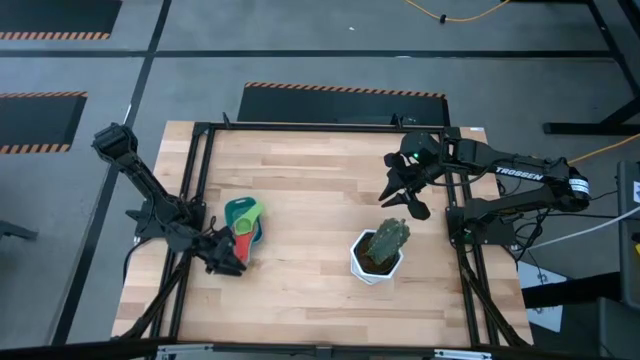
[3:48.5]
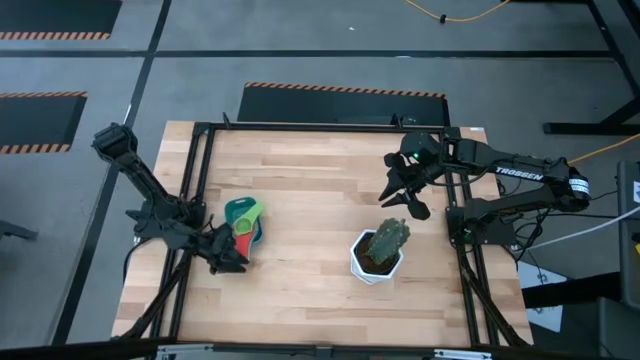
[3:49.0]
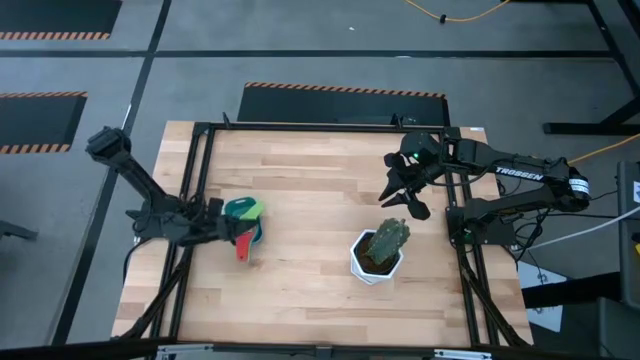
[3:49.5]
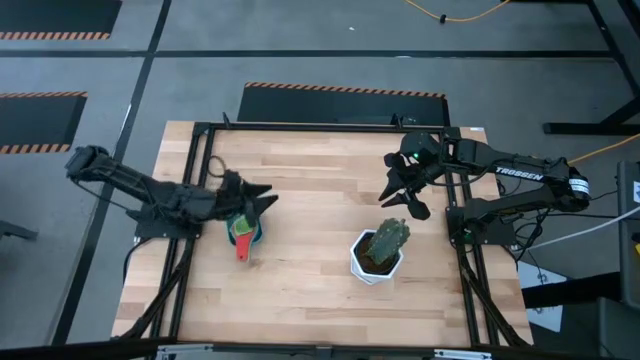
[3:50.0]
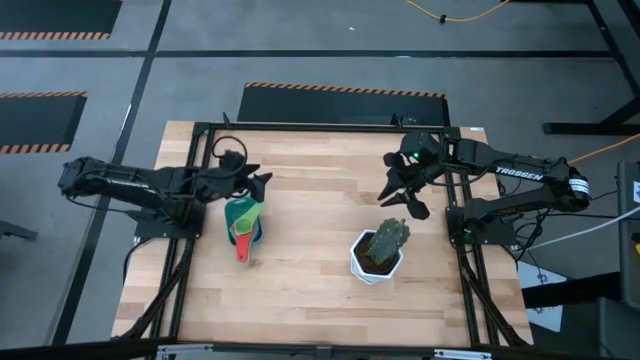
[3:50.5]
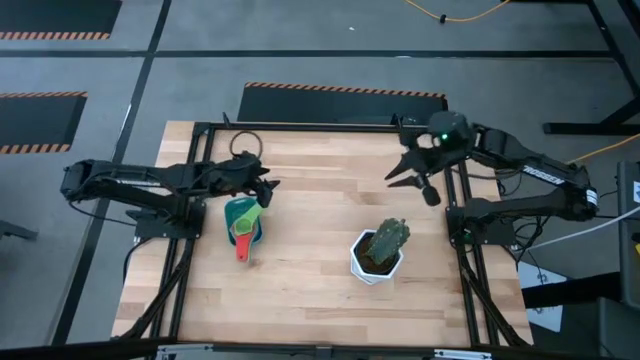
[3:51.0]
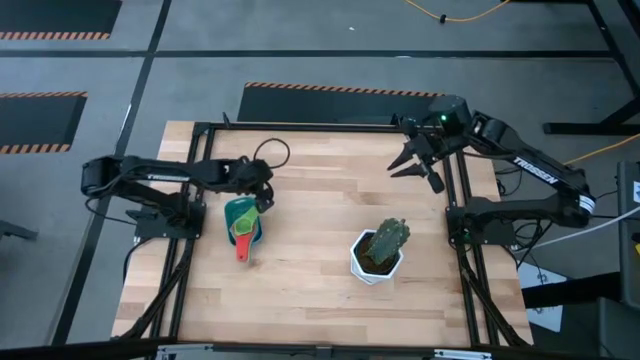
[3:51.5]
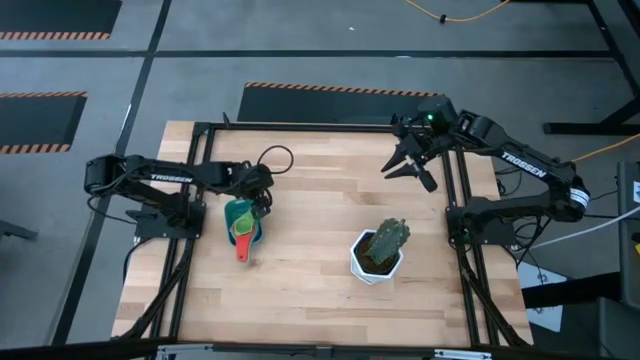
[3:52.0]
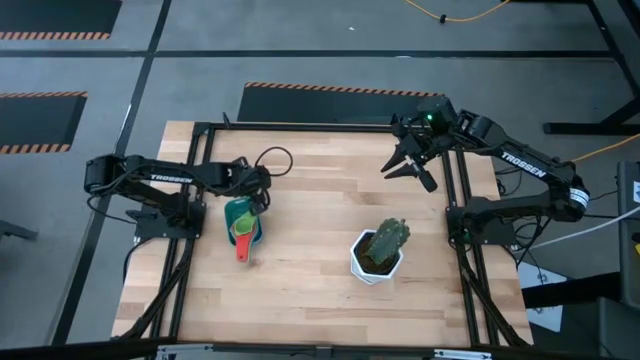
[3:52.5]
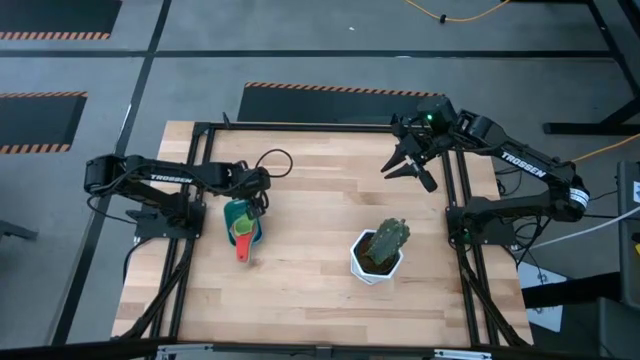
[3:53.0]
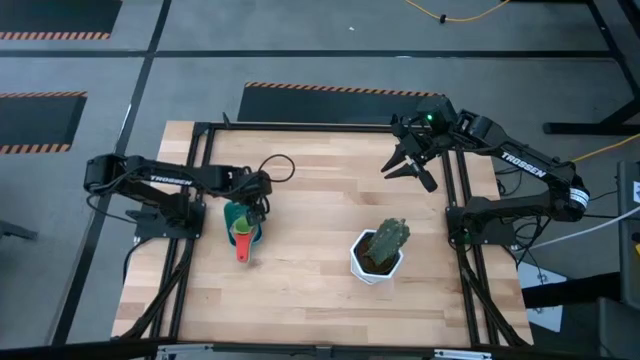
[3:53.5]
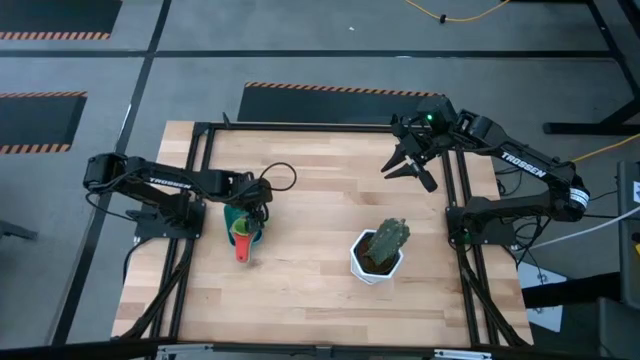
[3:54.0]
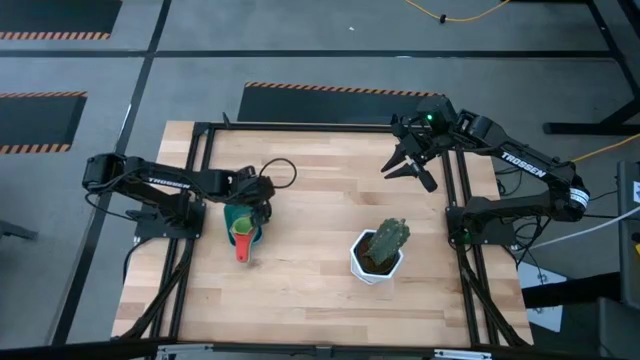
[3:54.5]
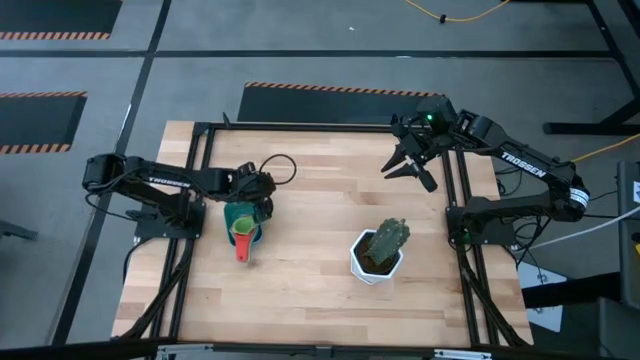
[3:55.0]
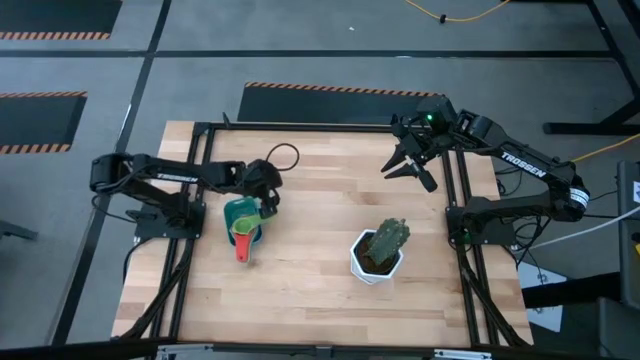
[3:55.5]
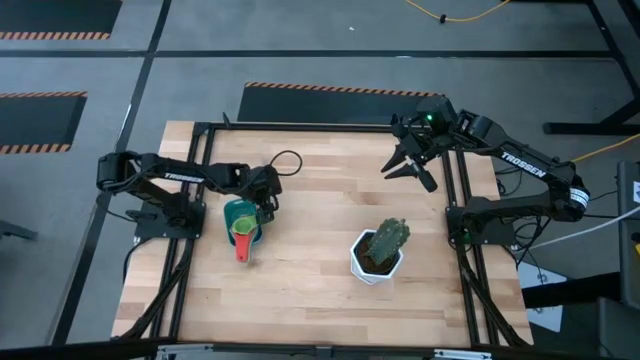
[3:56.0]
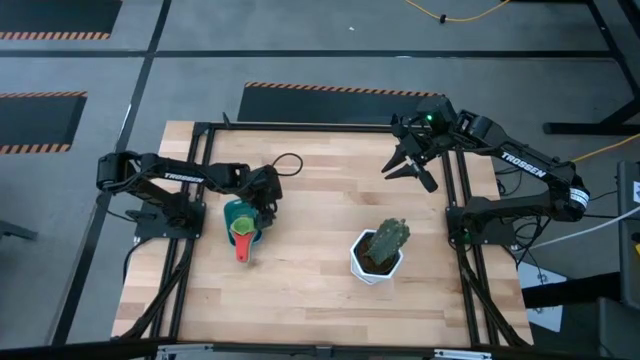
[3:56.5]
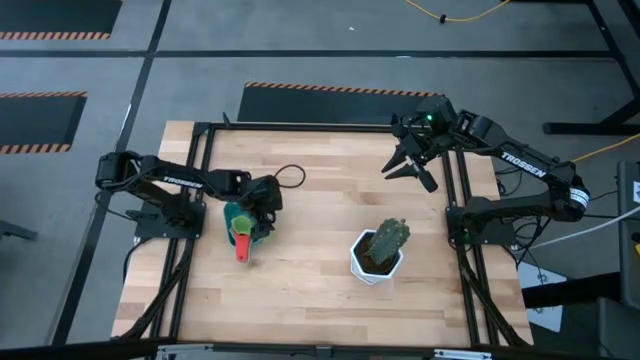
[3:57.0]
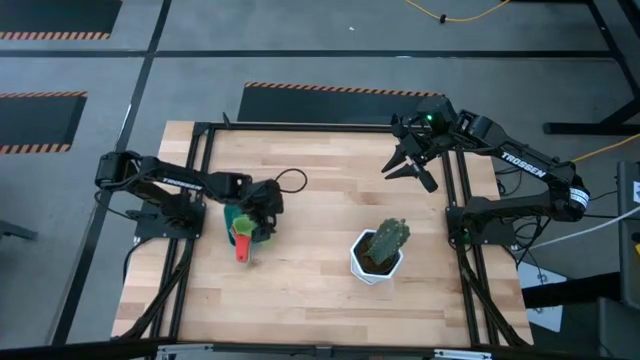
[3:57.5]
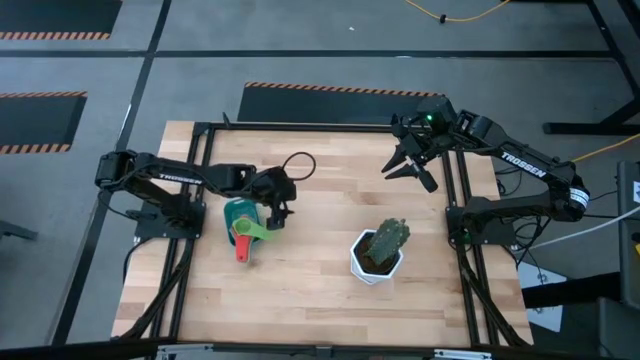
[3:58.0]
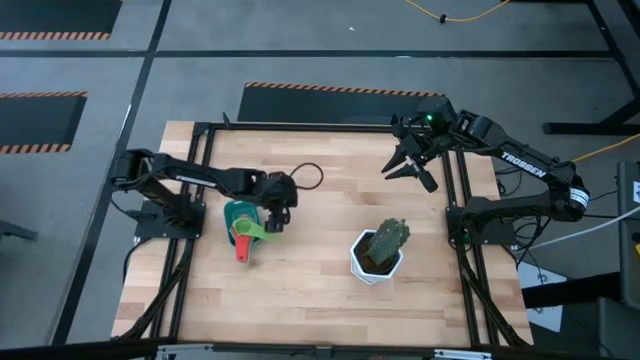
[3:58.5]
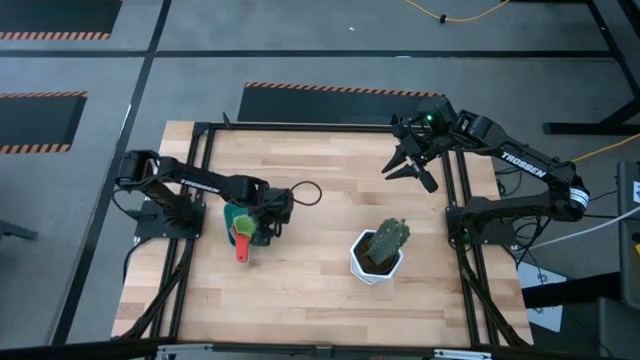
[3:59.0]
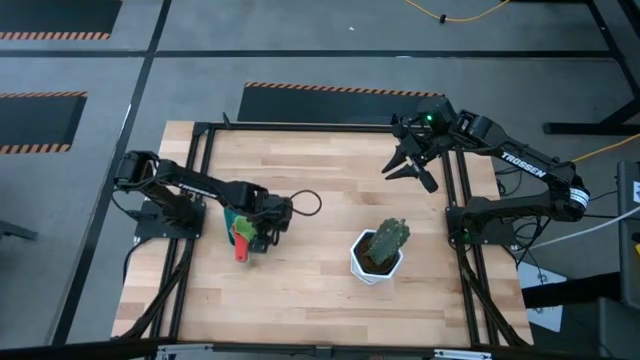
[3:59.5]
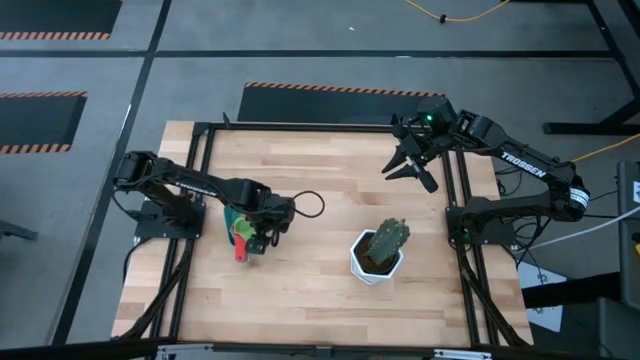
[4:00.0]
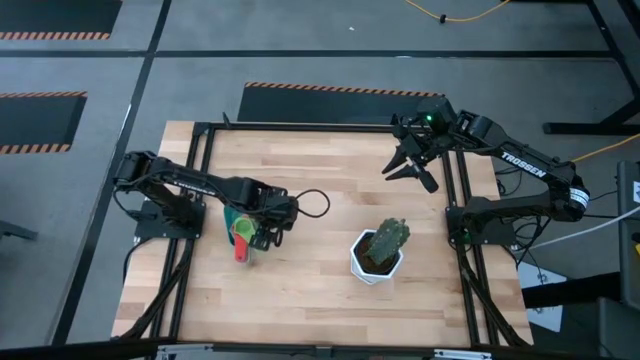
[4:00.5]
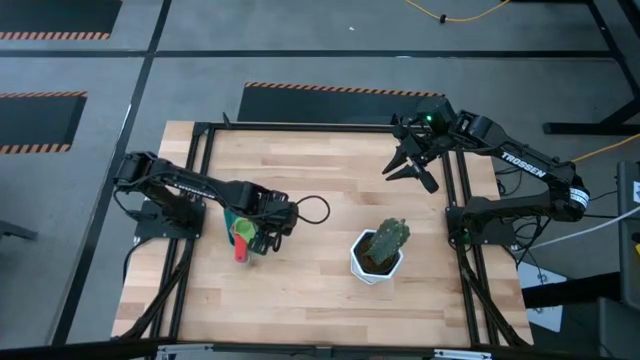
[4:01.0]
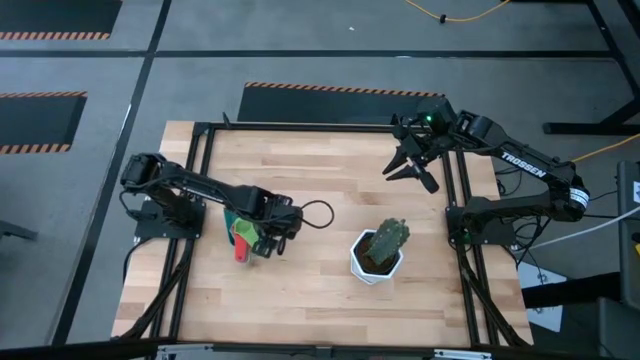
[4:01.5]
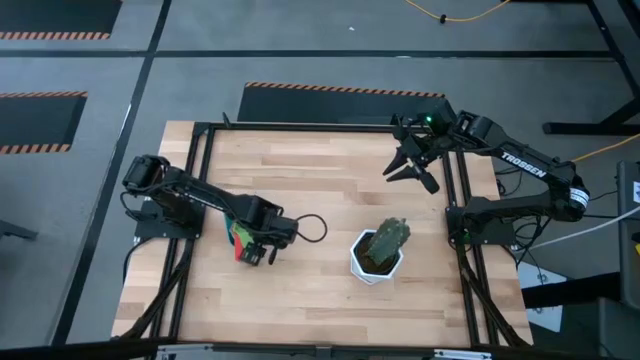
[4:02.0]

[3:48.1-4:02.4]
Task: Nest measuring cups in basket
Adjust the green measuring cup

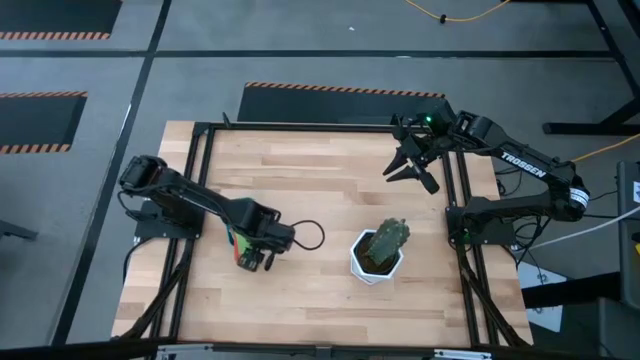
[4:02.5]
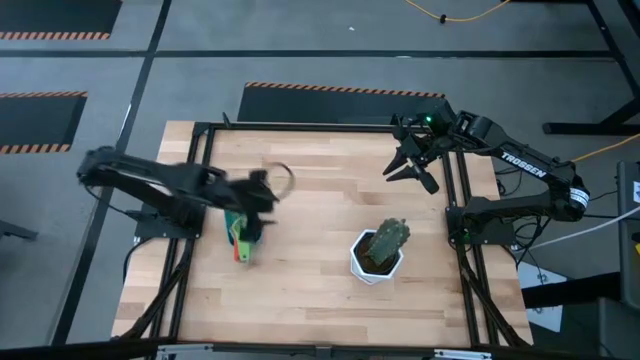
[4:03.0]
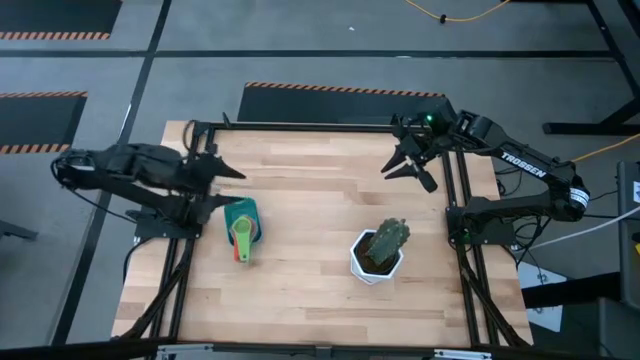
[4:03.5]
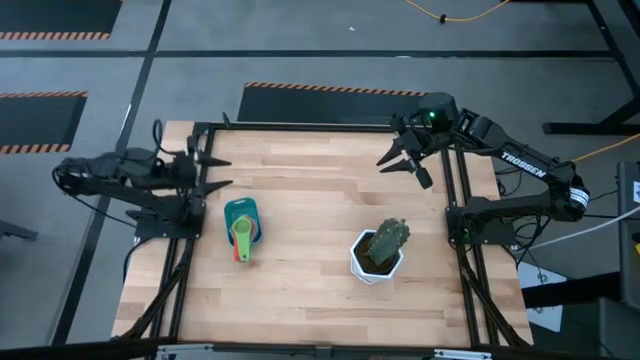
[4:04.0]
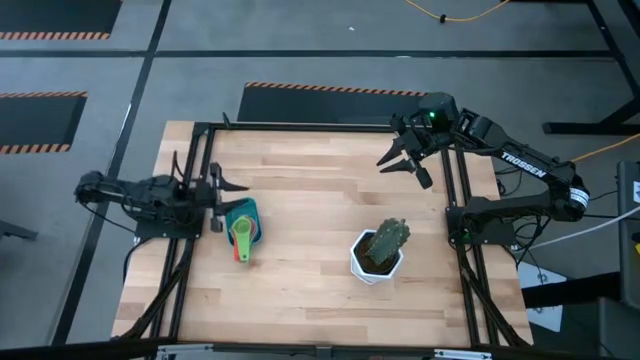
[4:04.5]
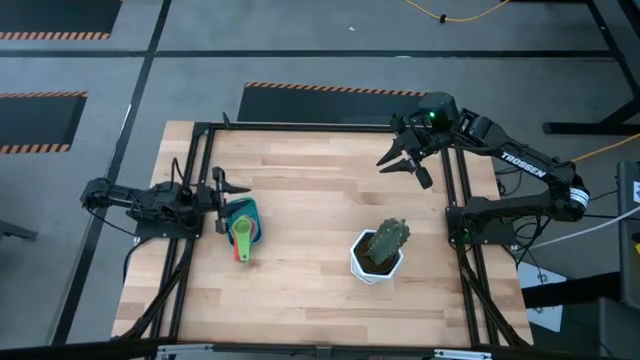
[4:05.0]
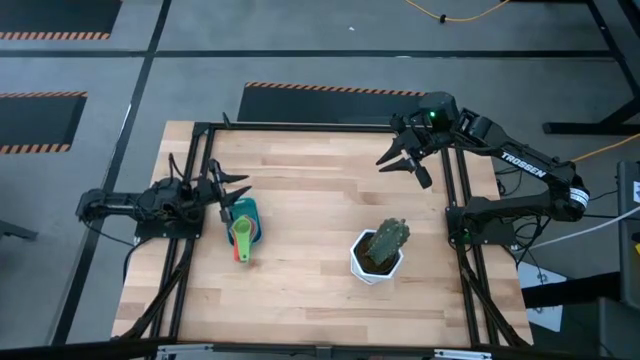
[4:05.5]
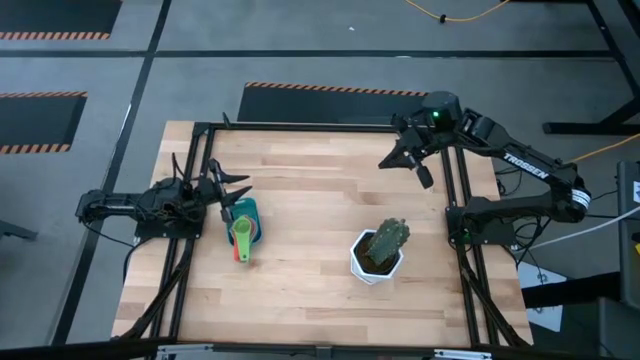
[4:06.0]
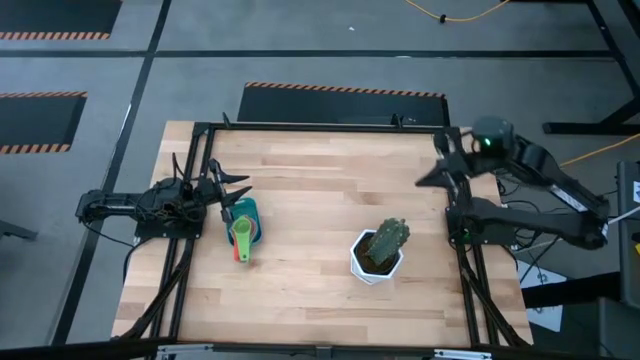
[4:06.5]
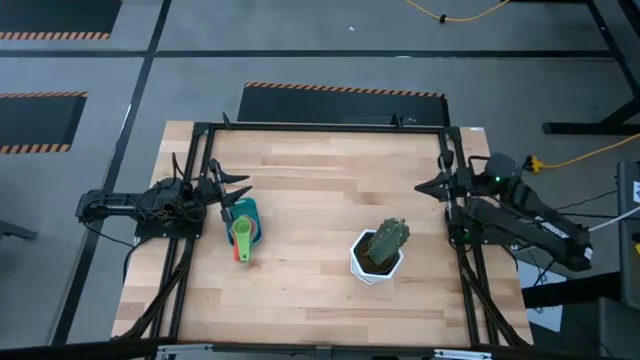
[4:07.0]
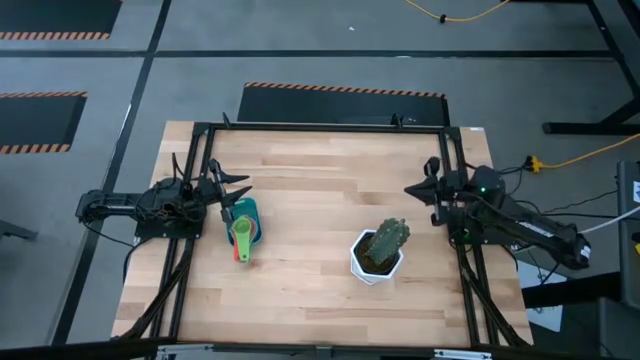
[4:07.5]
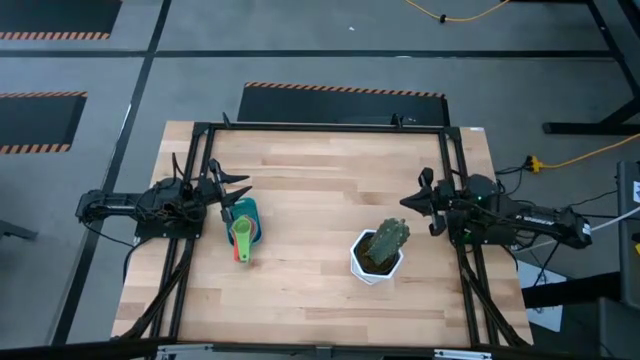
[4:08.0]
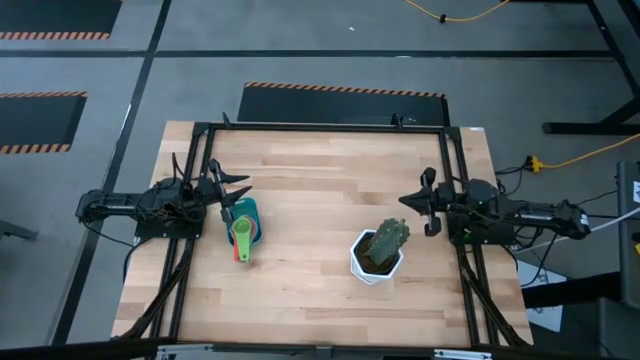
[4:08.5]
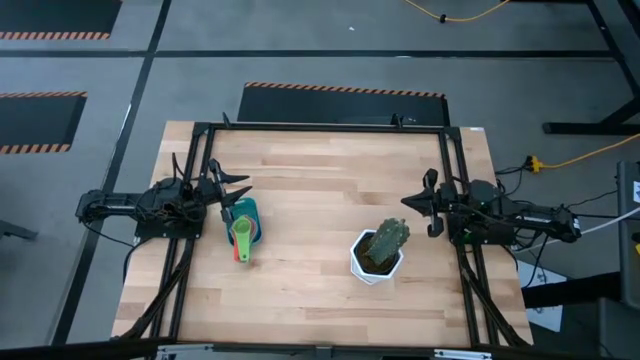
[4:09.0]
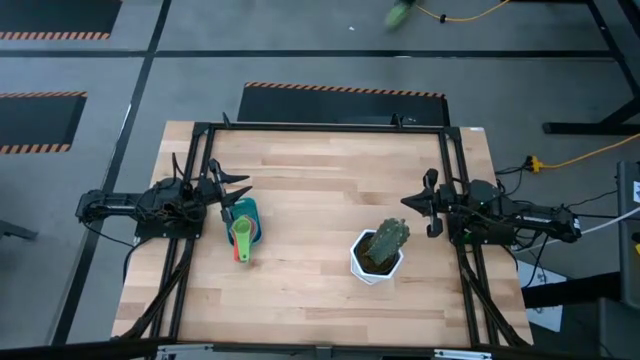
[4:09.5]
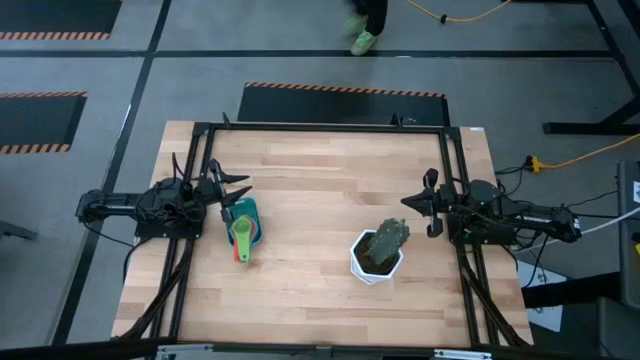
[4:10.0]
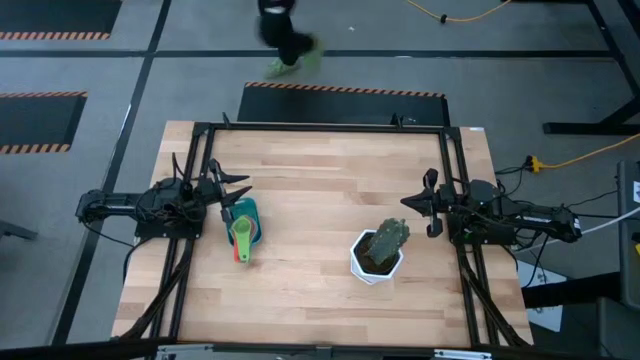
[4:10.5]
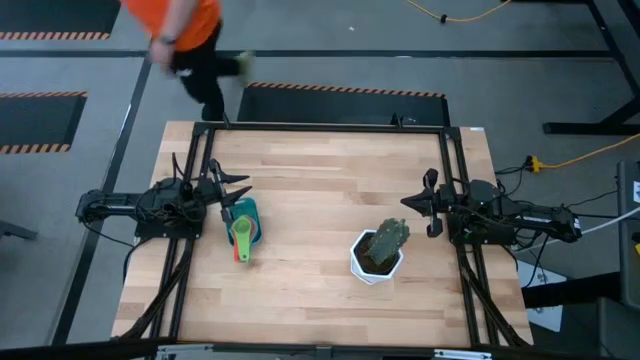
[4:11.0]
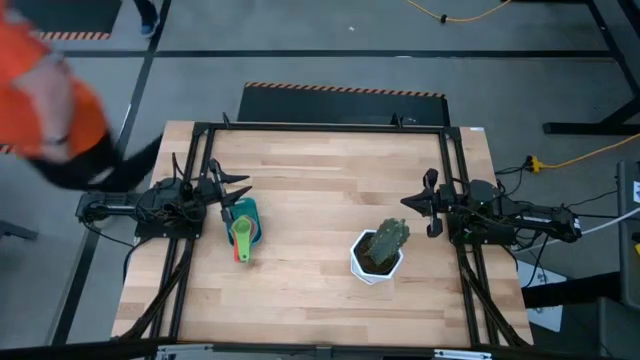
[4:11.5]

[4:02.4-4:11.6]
Return to Home Position
